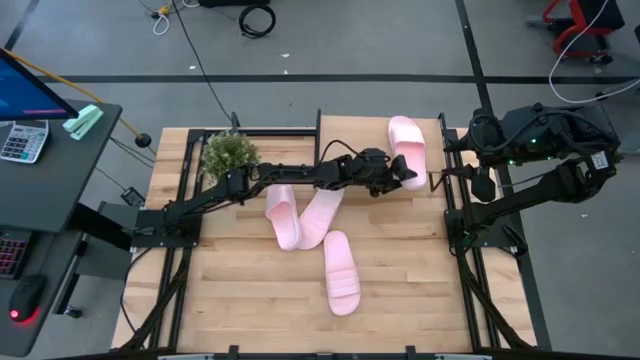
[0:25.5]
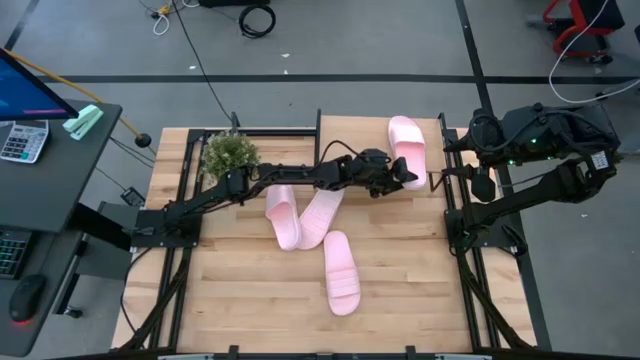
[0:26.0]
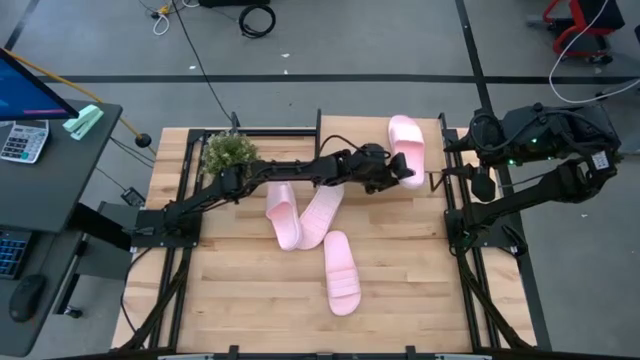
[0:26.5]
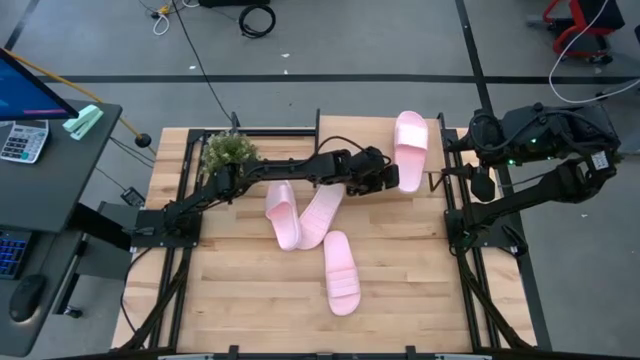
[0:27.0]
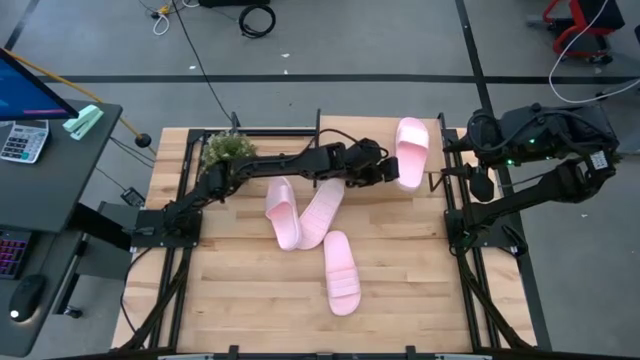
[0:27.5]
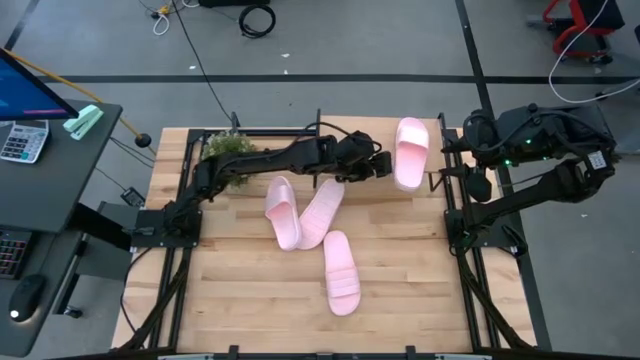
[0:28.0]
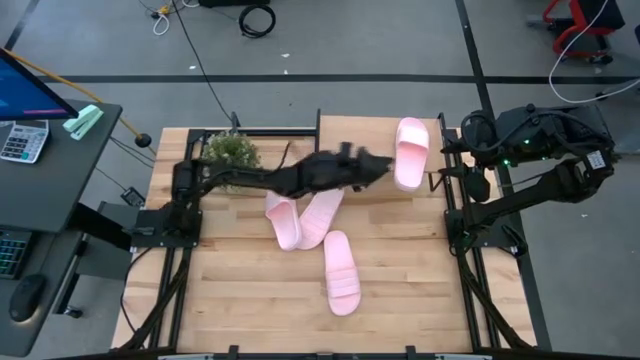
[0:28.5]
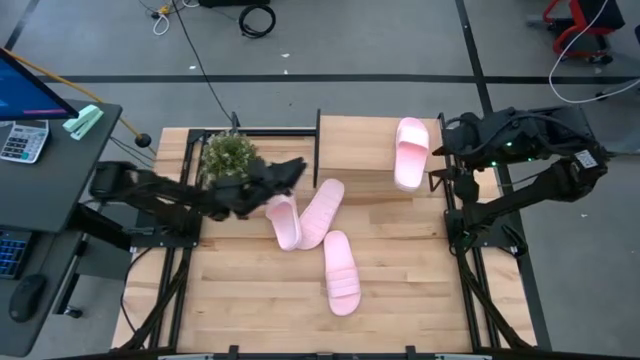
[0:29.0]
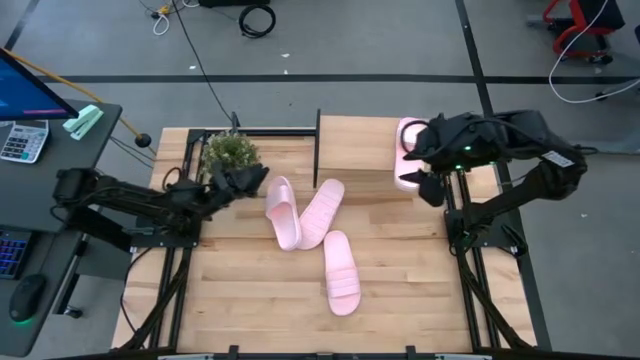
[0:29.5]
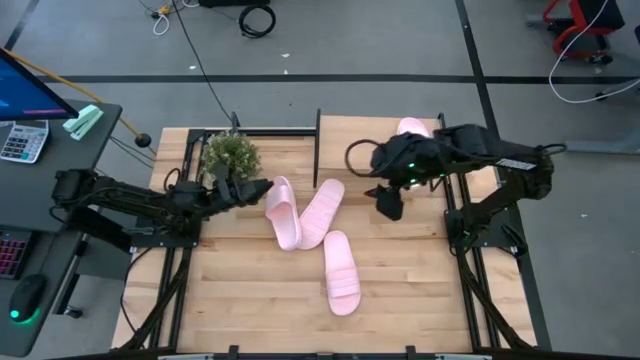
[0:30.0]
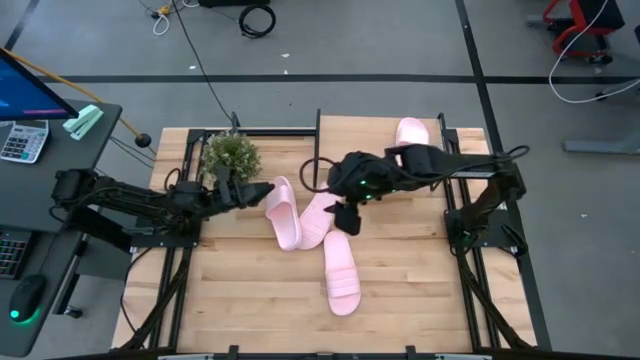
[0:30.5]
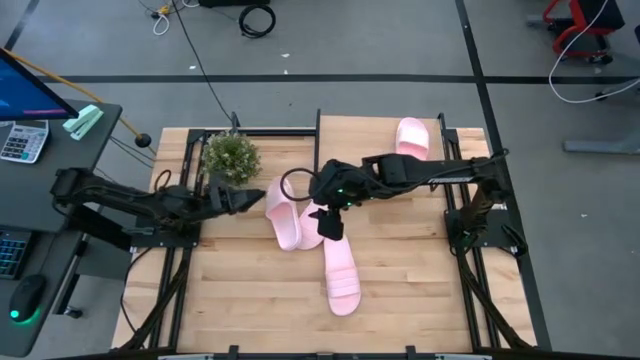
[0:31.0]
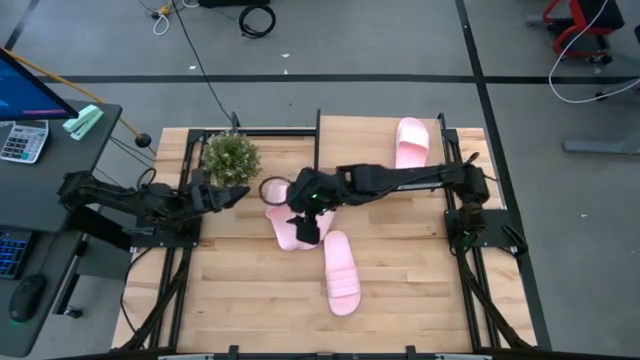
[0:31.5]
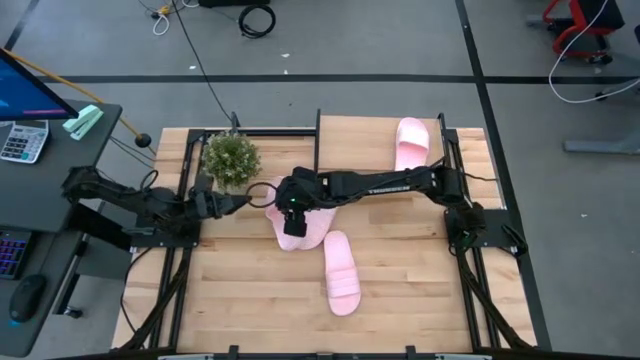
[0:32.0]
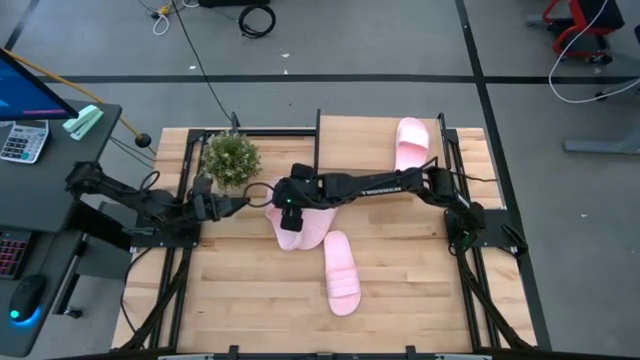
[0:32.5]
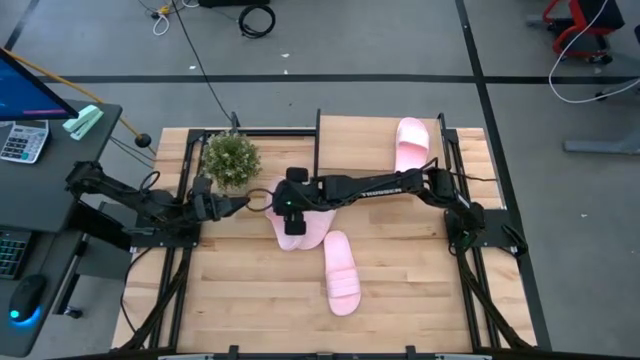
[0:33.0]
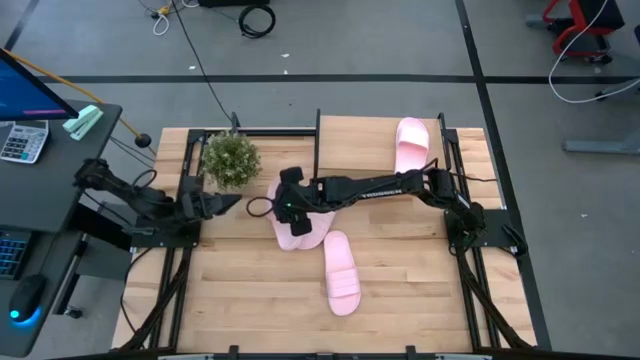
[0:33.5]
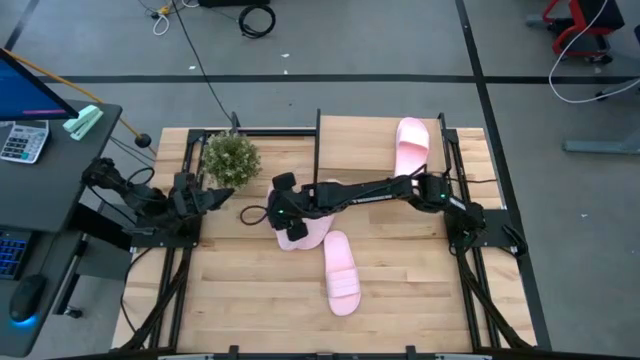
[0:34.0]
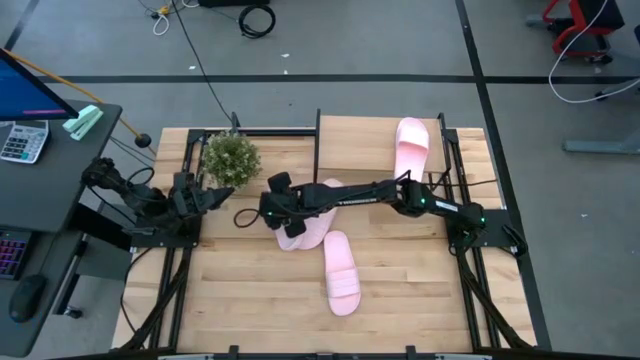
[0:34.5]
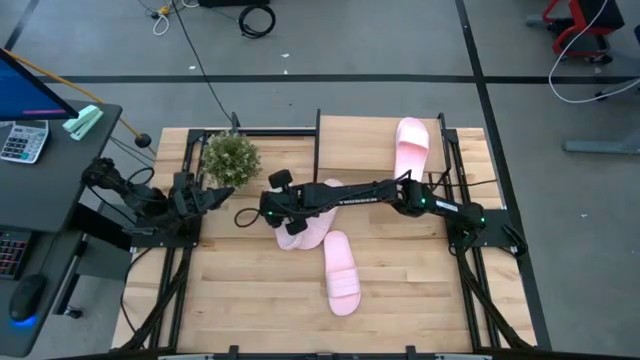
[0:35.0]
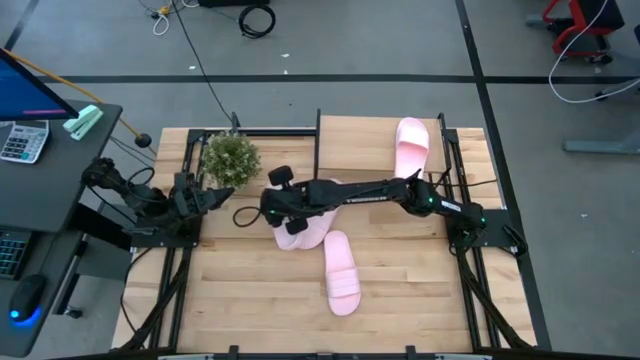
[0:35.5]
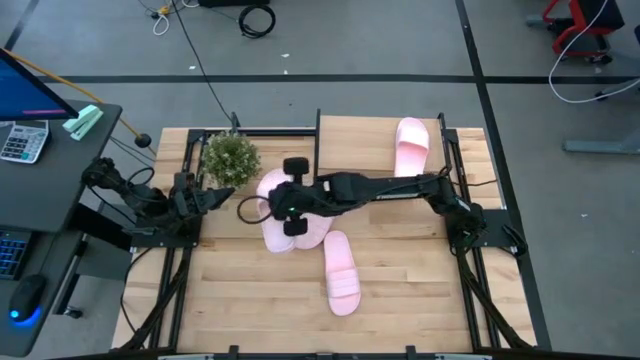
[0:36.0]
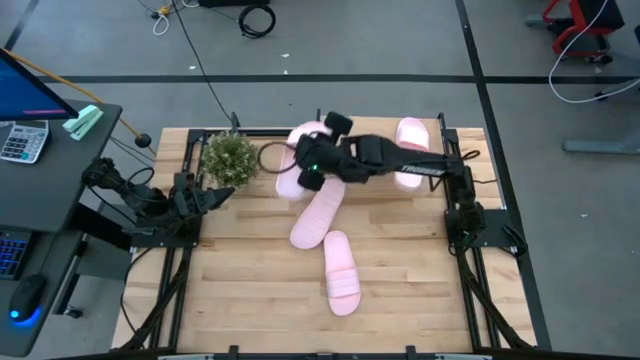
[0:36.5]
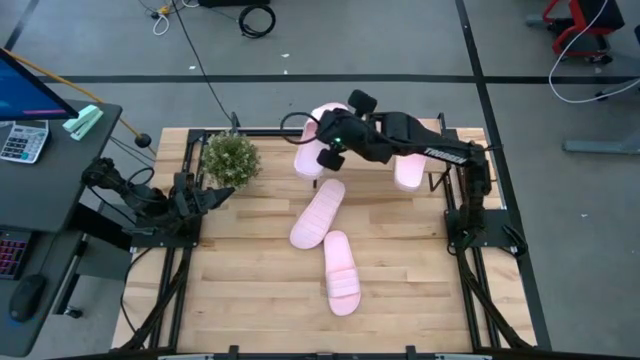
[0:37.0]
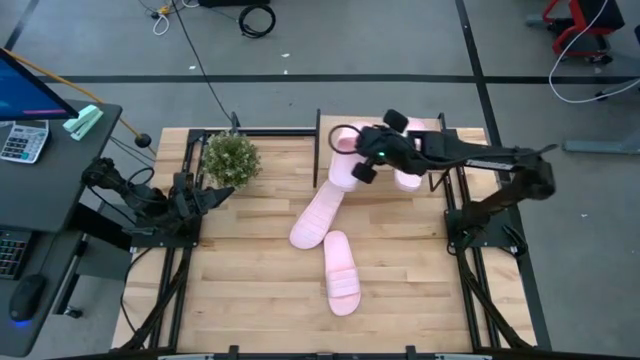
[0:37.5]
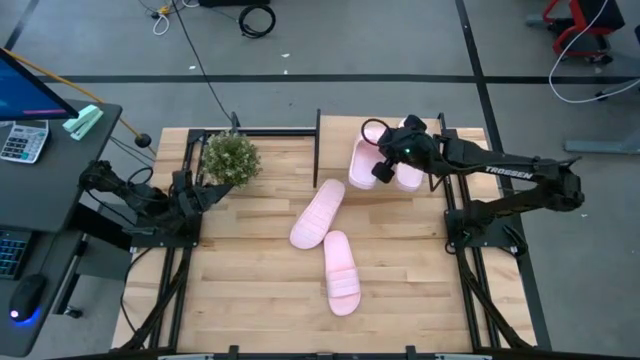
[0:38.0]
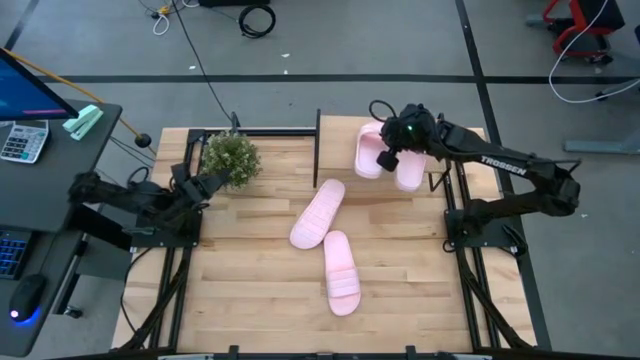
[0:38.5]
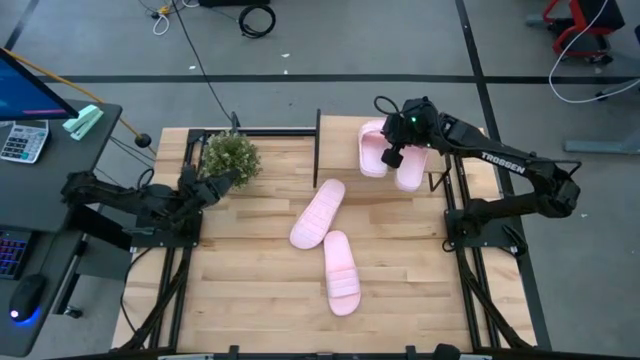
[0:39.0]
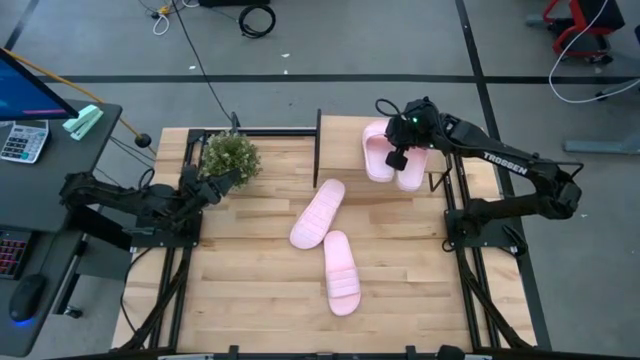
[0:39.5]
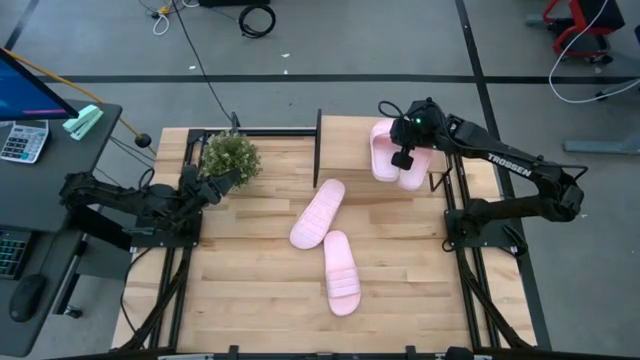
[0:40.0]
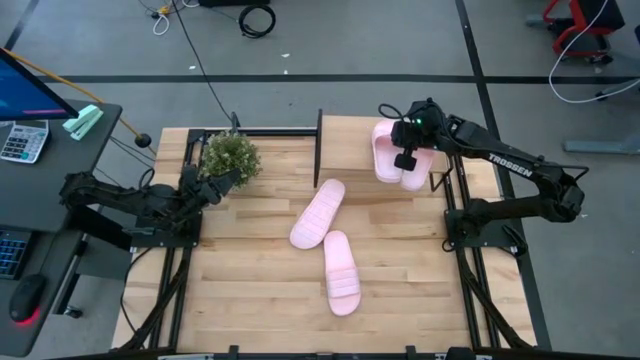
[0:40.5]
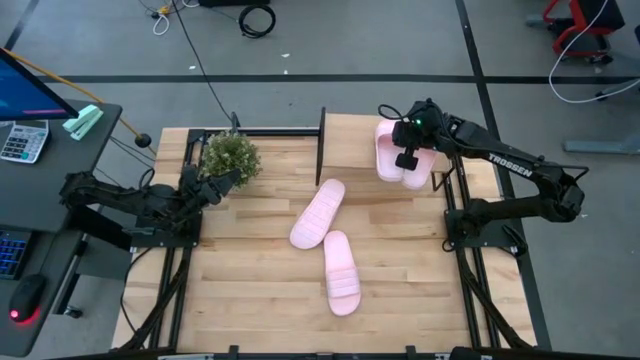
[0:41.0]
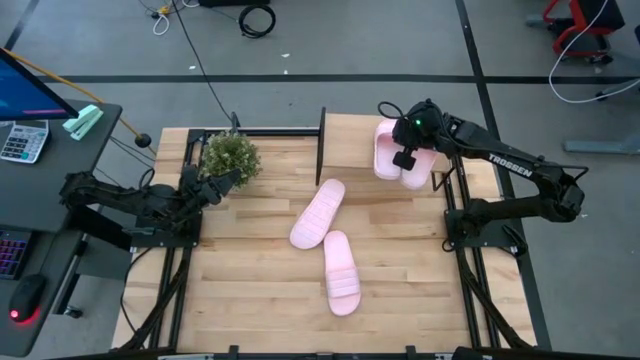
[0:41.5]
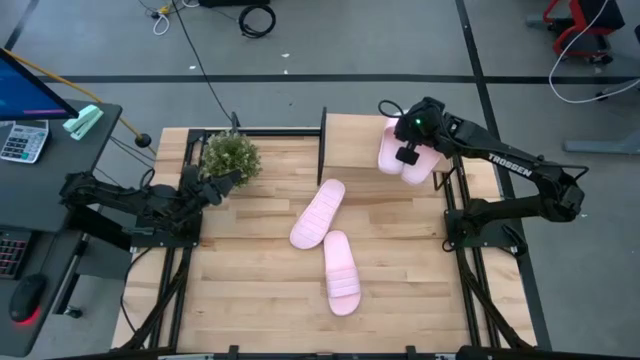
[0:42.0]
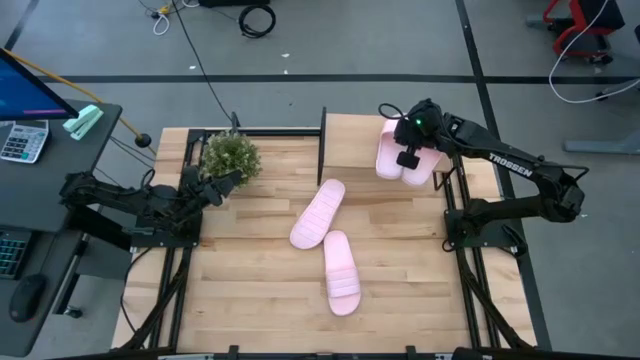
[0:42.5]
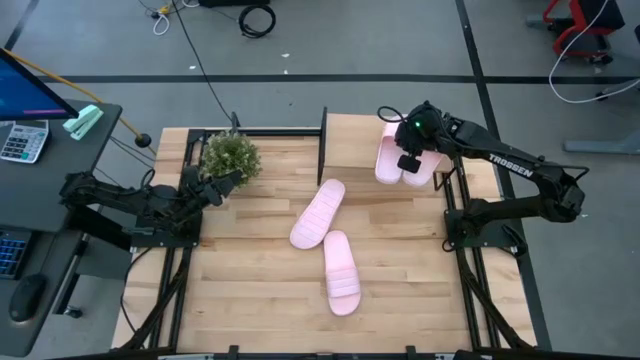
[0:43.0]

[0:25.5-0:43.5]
Task: Pick and place slides into the shelf
Put the top left pink slide on the shelf

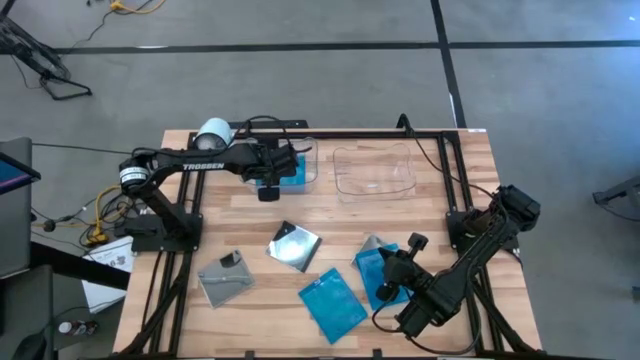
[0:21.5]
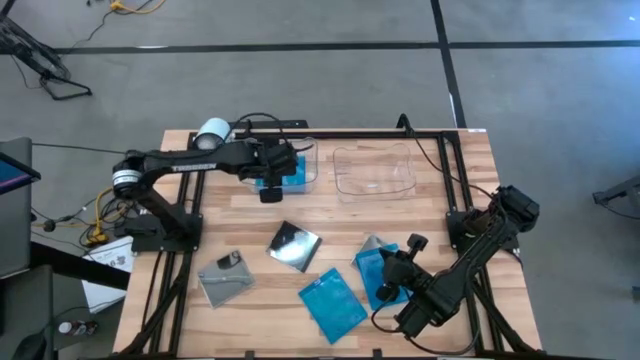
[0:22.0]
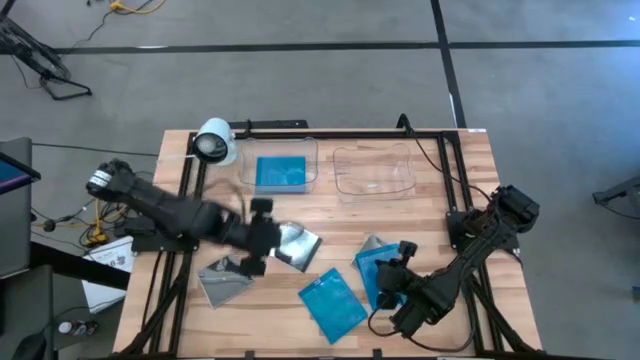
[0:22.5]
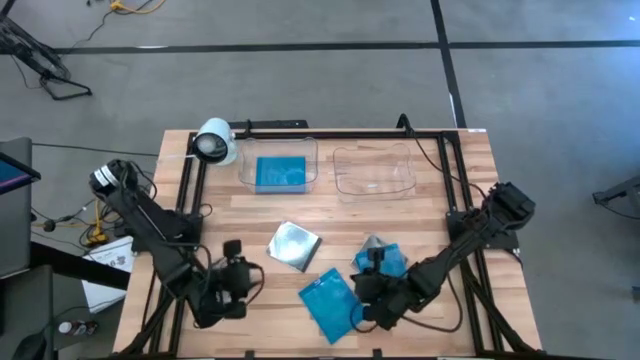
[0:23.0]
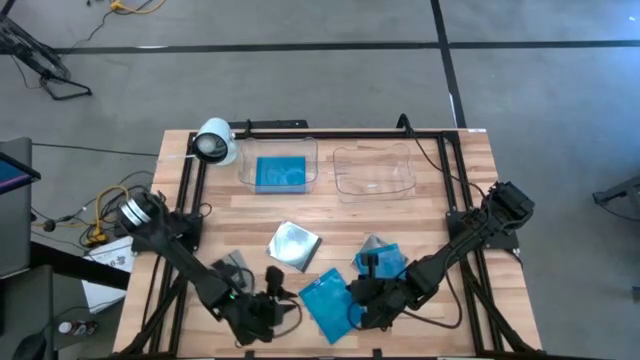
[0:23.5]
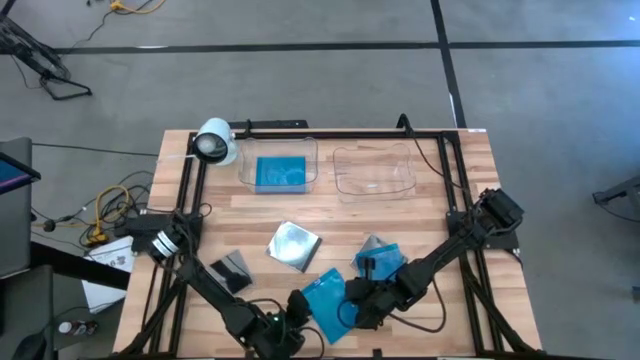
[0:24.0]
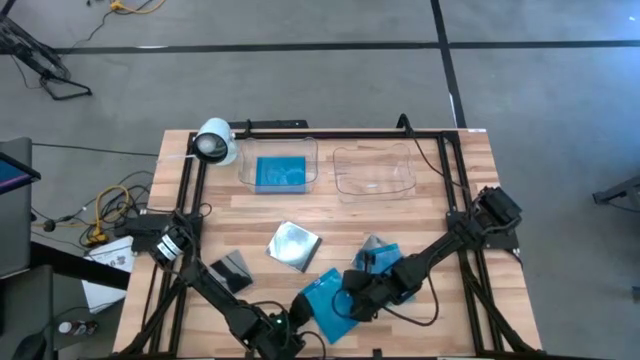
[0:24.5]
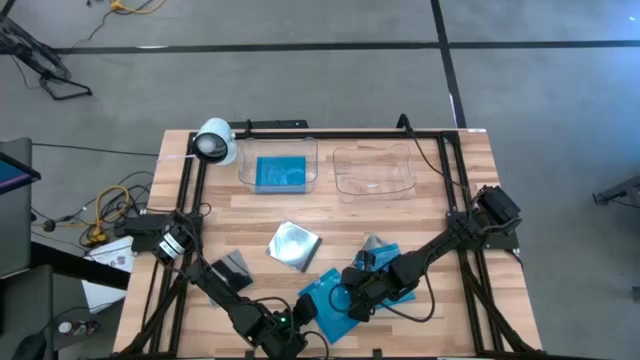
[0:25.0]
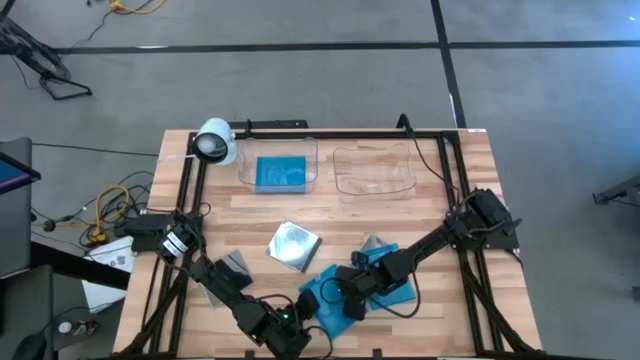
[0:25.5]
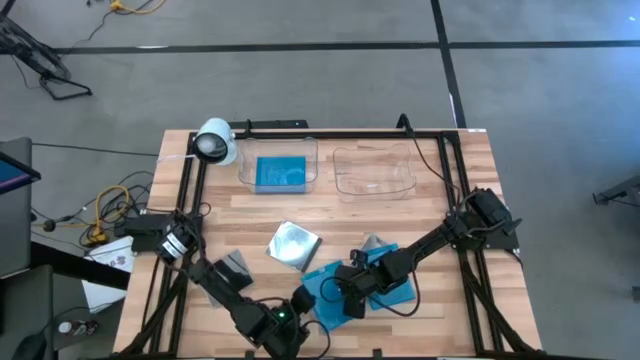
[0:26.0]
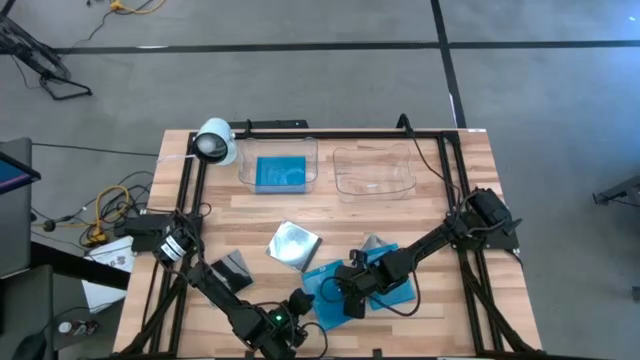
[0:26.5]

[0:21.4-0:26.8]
Task: Pick & place jewel cases by type
Put the left blue cd case into the left transparent bin
